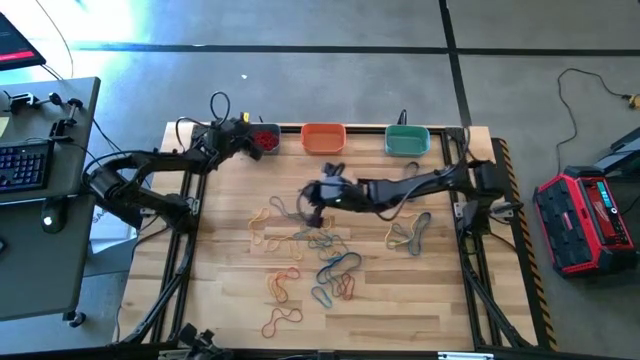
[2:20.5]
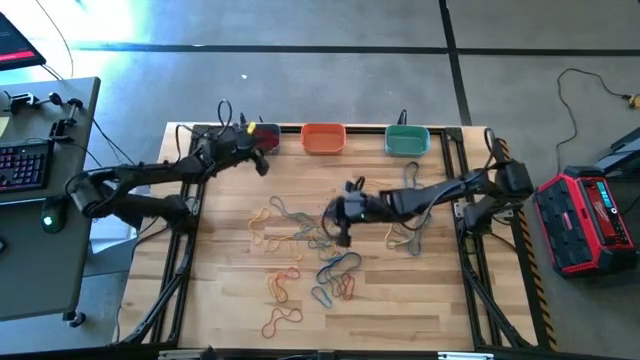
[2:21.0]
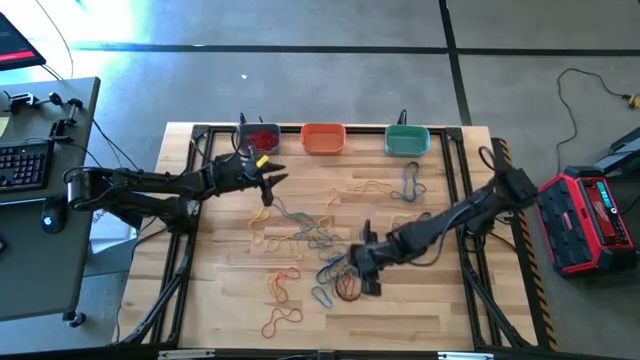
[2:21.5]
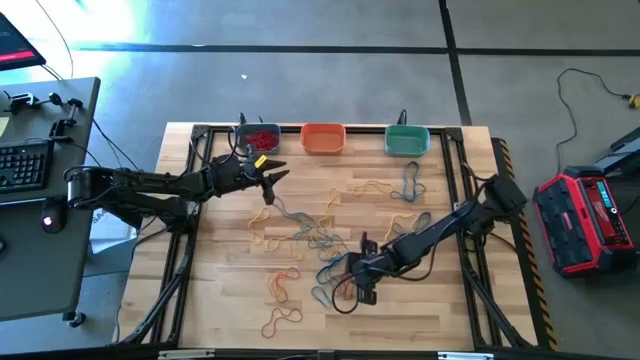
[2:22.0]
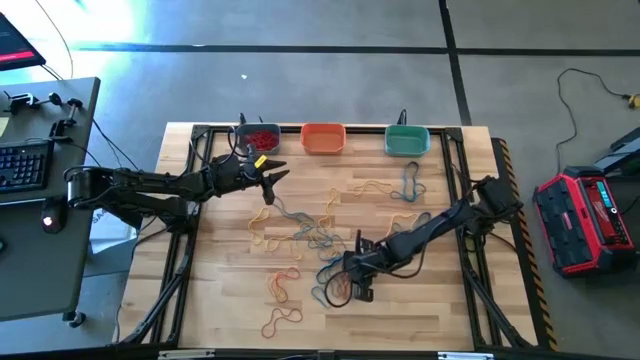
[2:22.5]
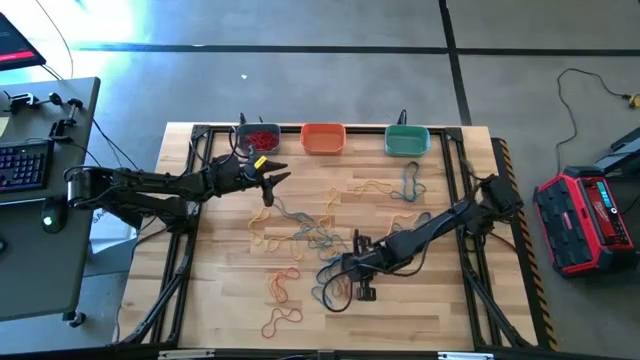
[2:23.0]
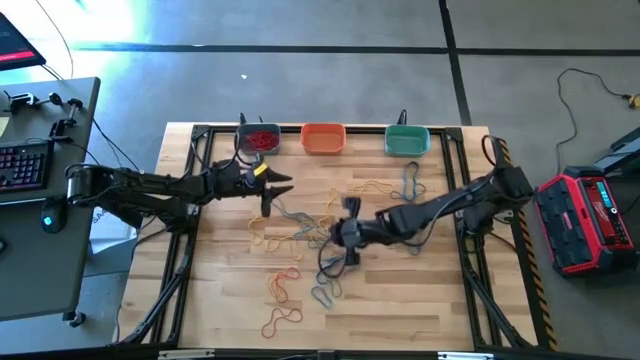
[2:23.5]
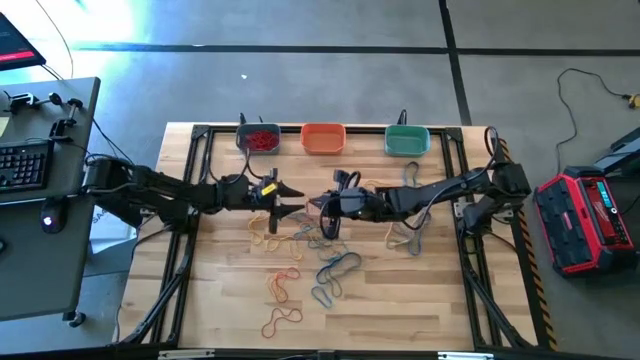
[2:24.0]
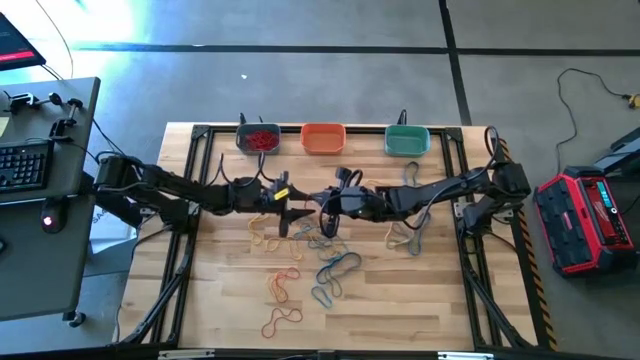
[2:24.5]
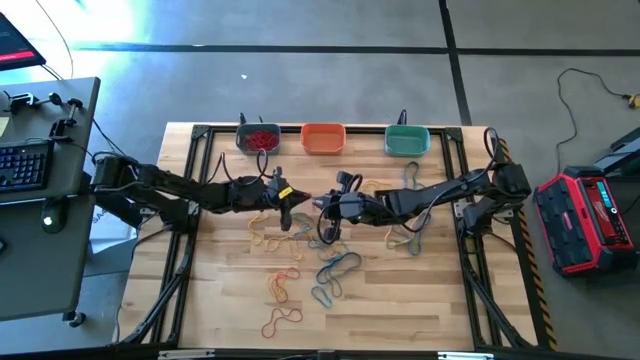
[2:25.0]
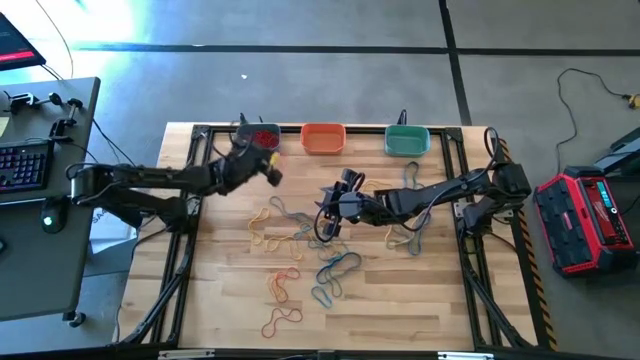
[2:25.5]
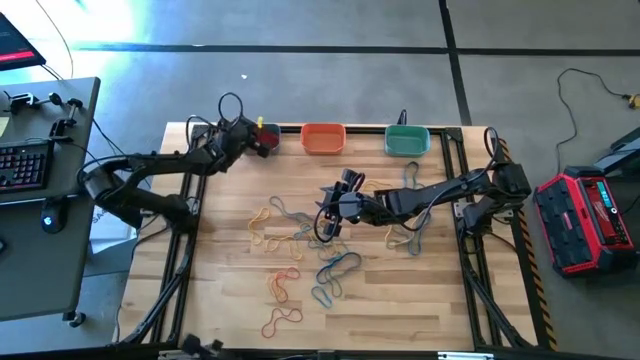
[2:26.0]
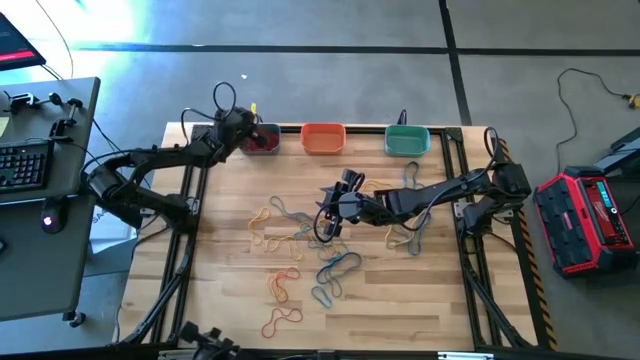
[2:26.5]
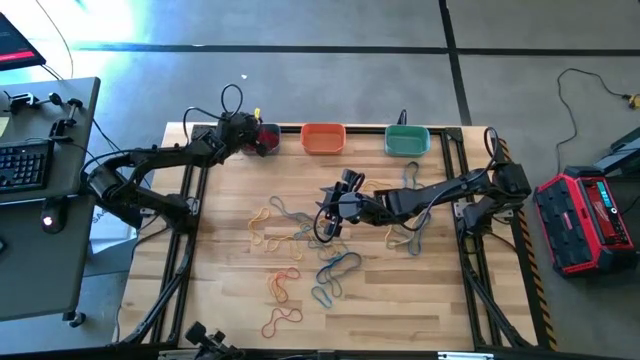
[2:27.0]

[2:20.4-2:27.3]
Task: Sort rubber bands into baskets
Put the red rubber band into the blue bin

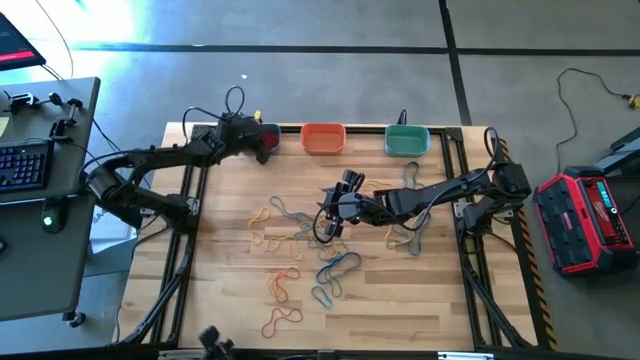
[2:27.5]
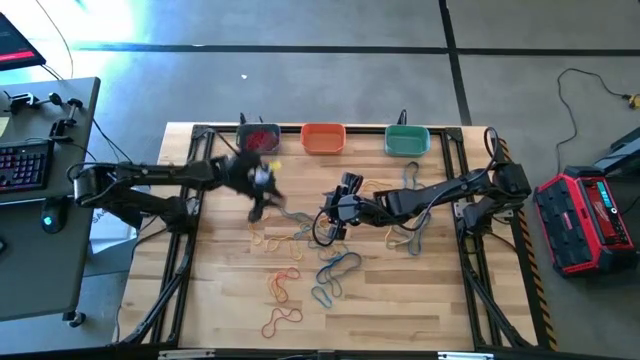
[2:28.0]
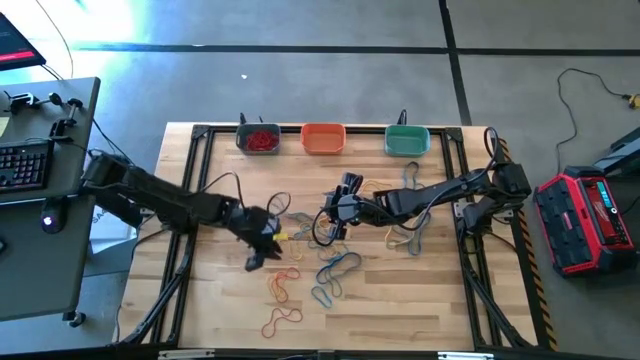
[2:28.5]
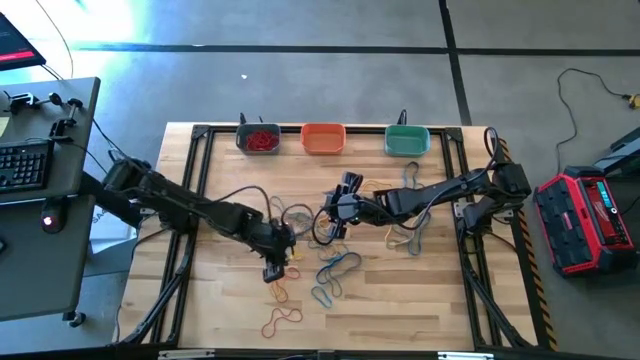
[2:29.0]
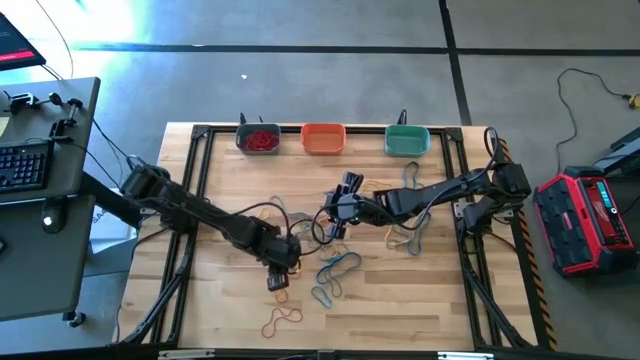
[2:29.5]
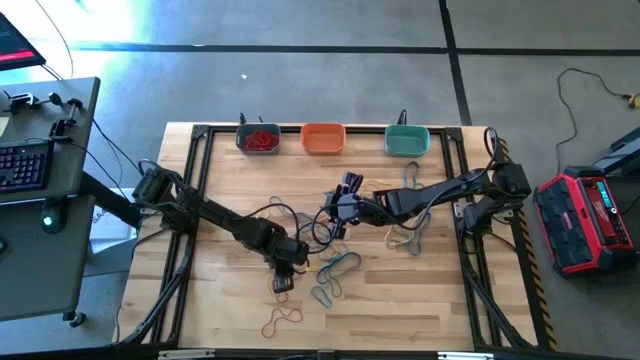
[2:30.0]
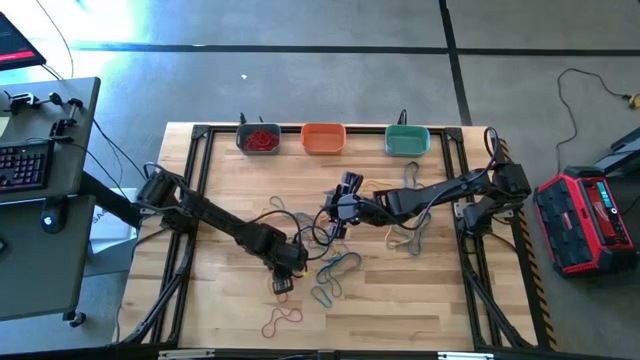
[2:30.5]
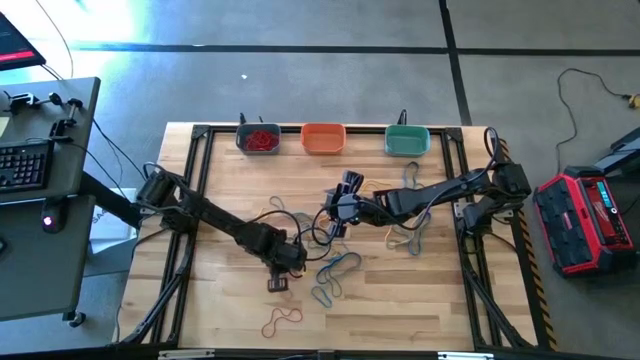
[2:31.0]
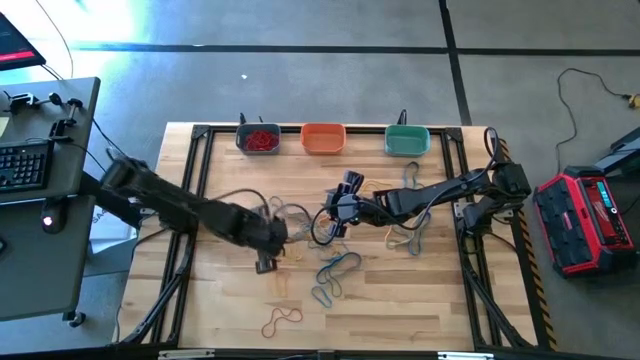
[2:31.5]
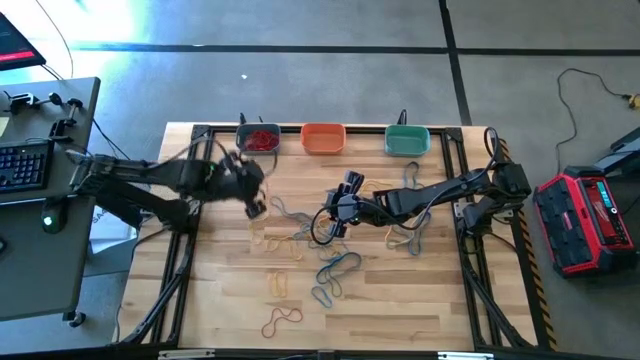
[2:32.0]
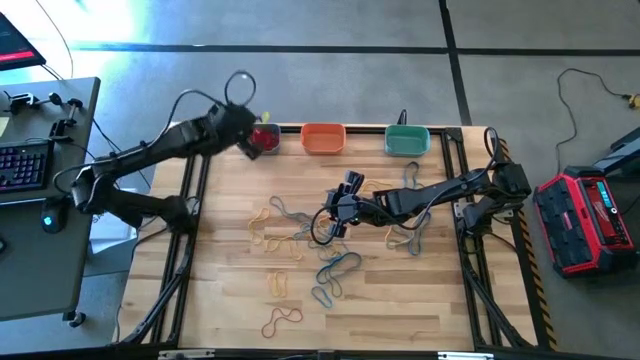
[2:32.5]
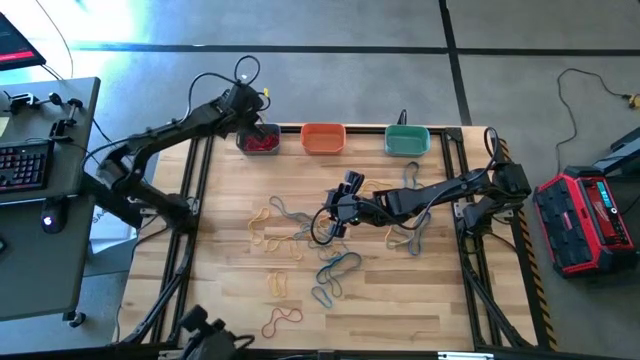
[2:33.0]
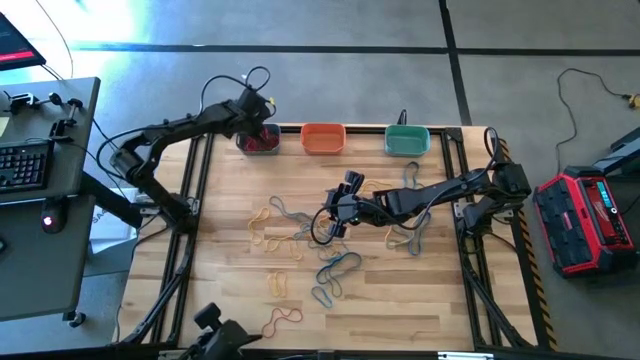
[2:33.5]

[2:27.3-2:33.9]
Put the red rubber band into the blue bin

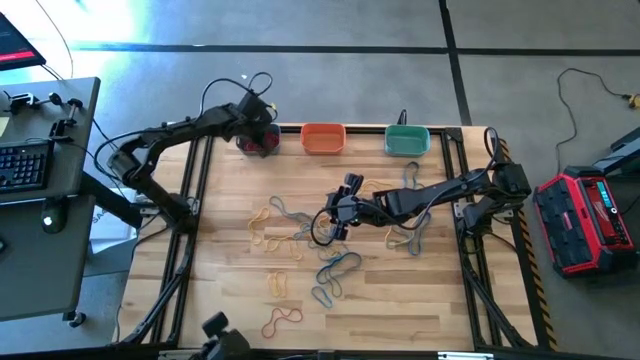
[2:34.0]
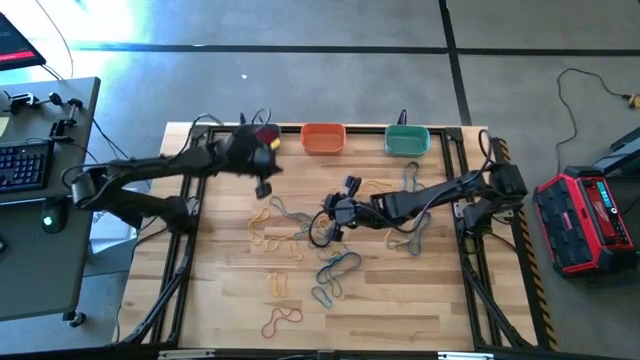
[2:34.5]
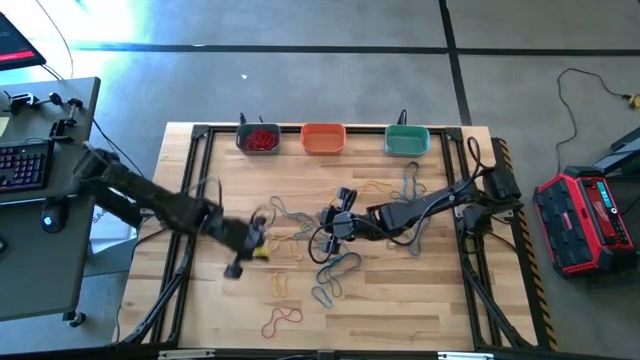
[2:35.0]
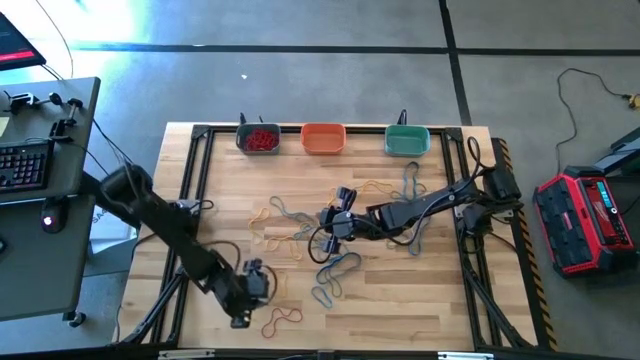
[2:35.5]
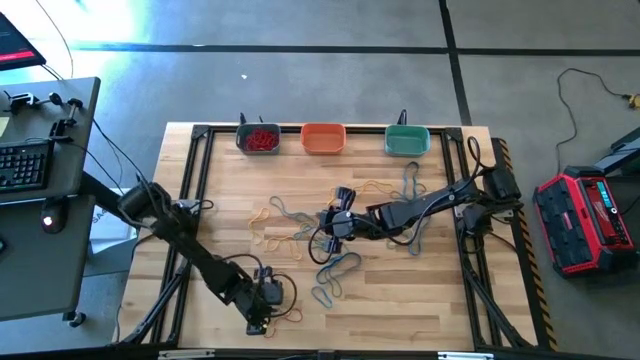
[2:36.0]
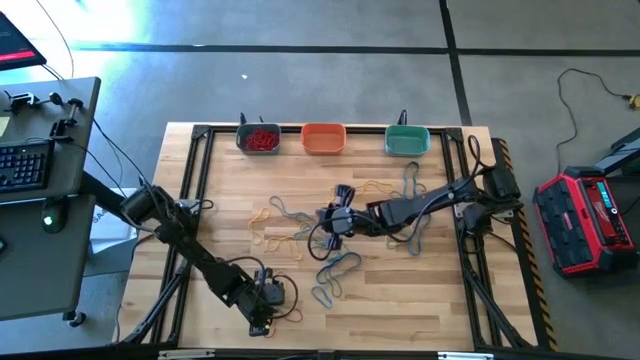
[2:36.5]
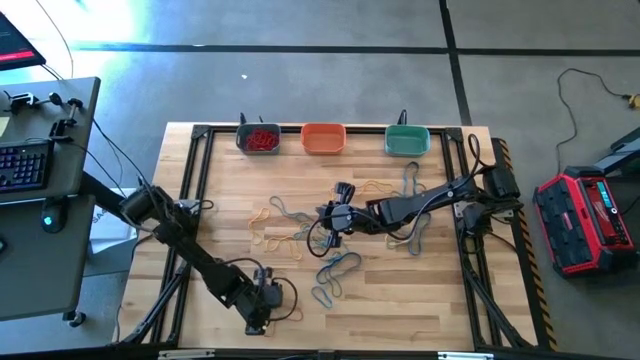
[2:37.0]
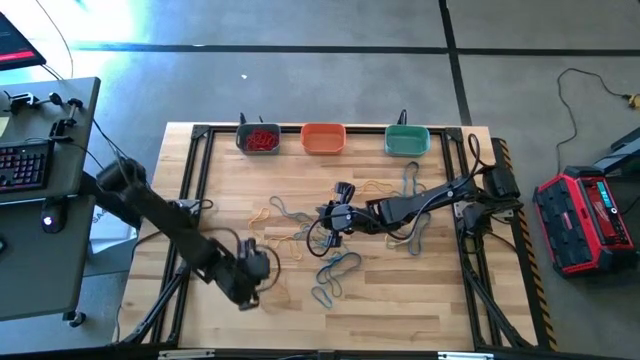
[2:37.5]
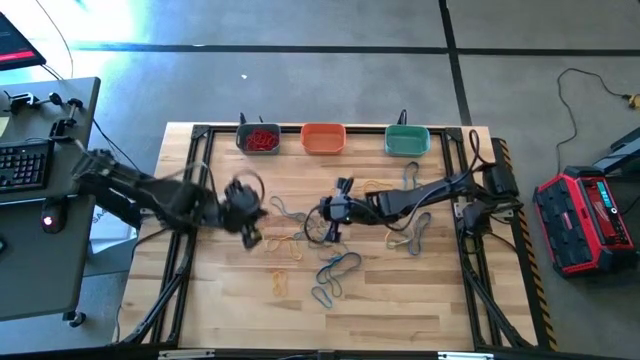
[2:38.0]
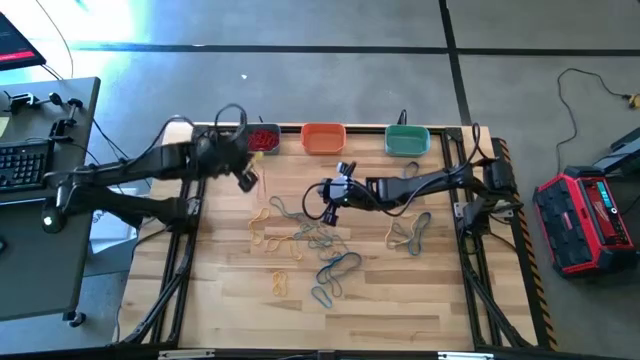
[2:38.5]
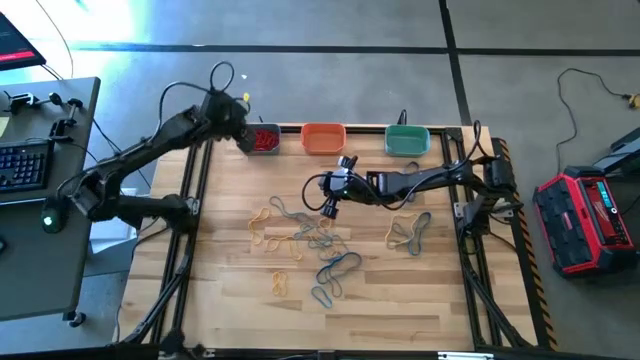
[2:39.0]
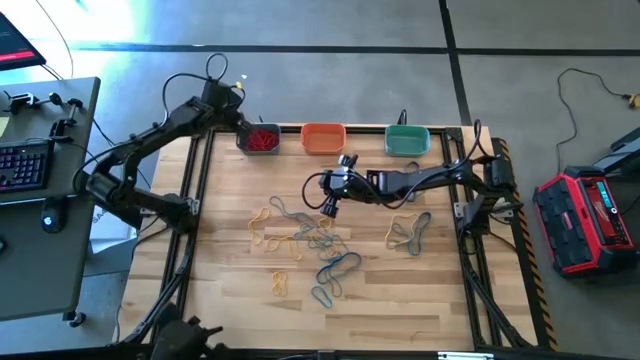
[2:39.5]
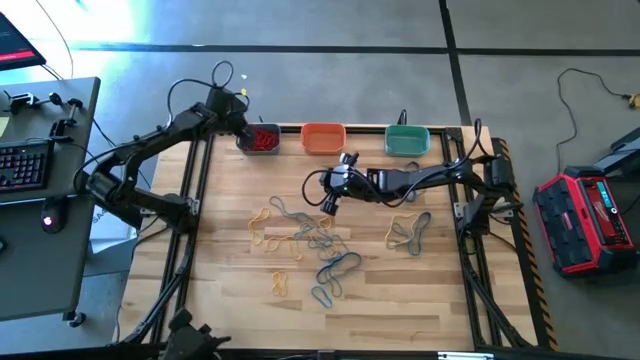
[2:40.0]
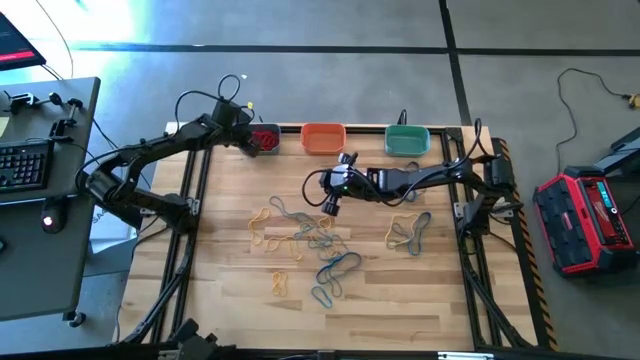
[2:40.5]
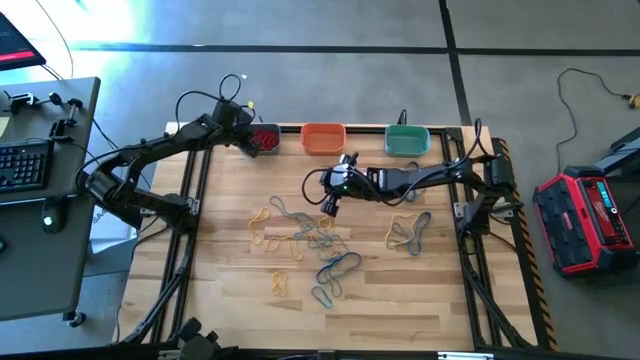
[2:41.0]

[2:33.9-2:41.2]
Put the red rubber band into the blue bin
